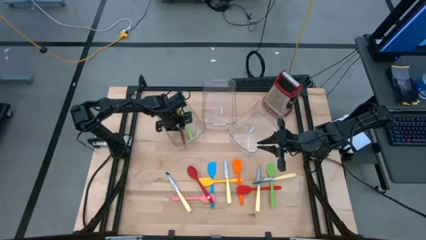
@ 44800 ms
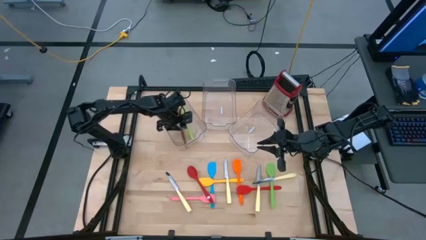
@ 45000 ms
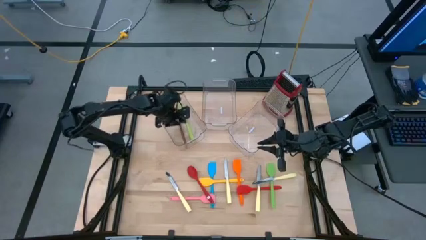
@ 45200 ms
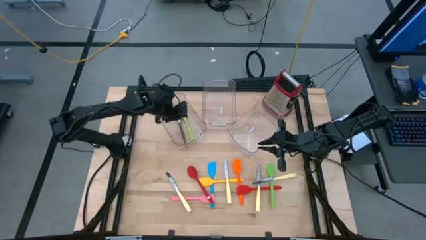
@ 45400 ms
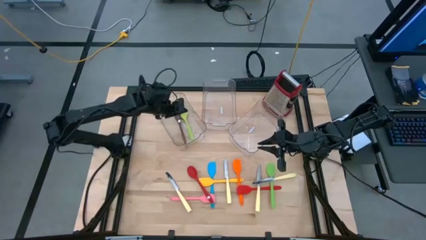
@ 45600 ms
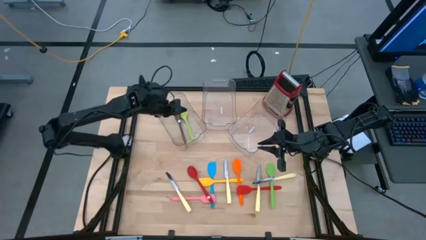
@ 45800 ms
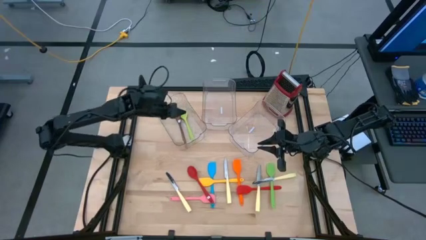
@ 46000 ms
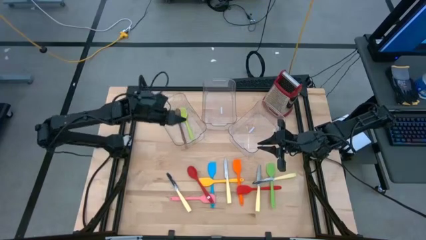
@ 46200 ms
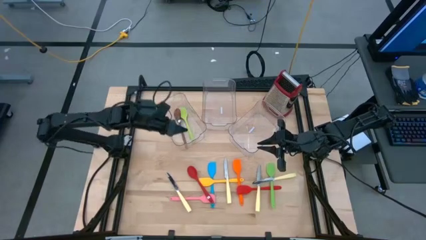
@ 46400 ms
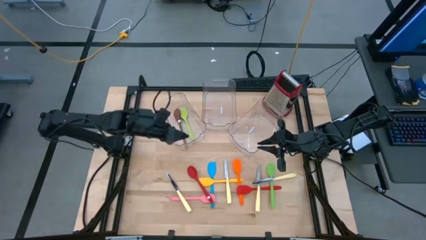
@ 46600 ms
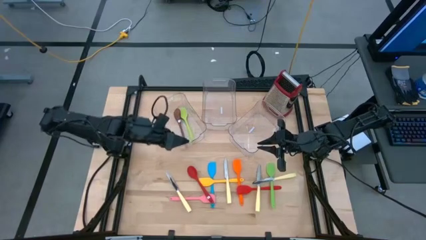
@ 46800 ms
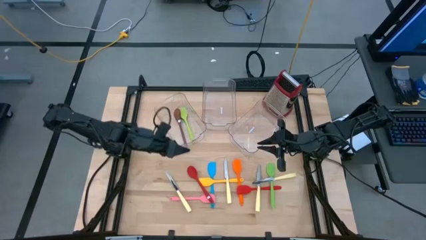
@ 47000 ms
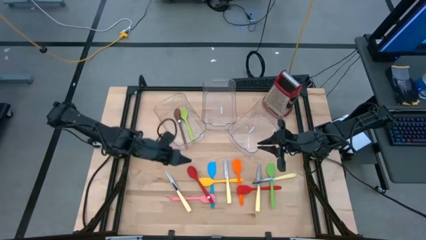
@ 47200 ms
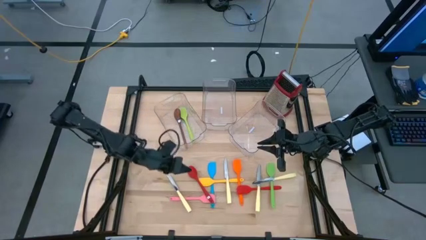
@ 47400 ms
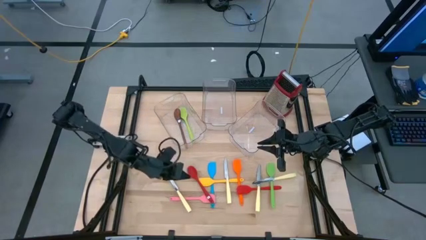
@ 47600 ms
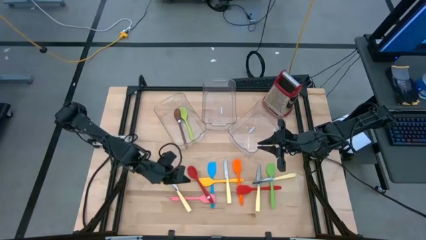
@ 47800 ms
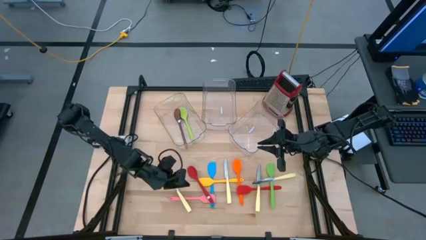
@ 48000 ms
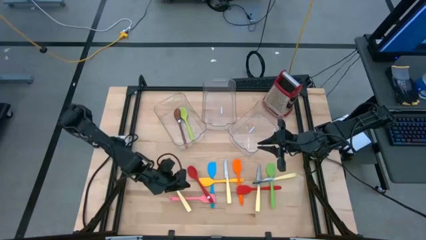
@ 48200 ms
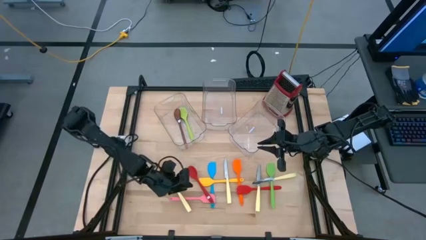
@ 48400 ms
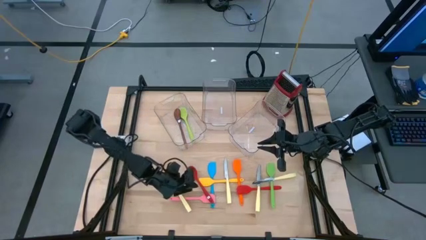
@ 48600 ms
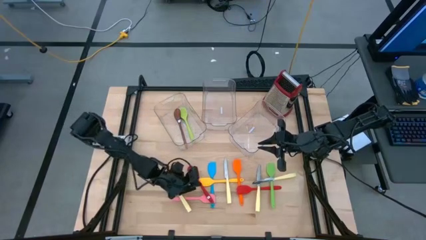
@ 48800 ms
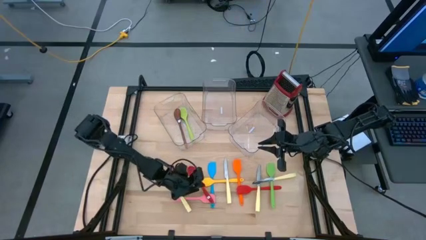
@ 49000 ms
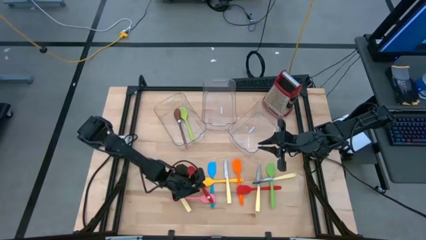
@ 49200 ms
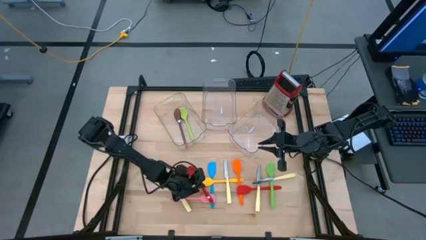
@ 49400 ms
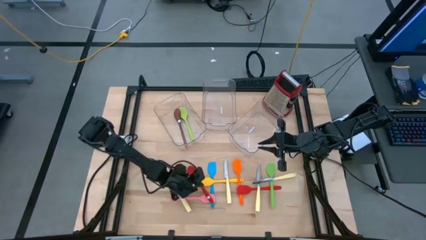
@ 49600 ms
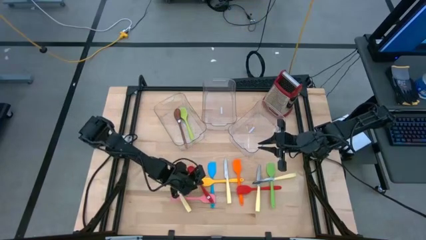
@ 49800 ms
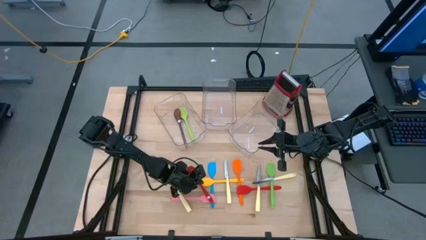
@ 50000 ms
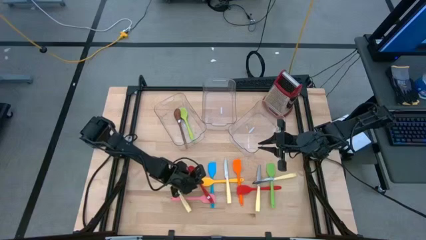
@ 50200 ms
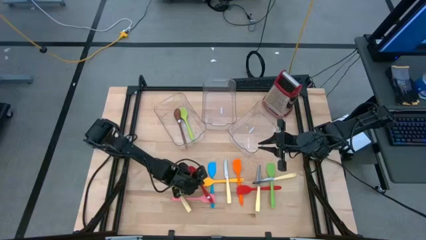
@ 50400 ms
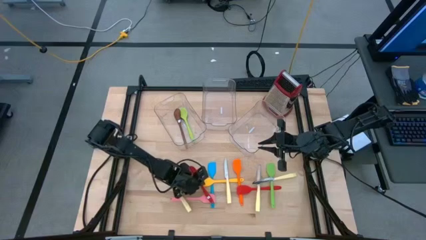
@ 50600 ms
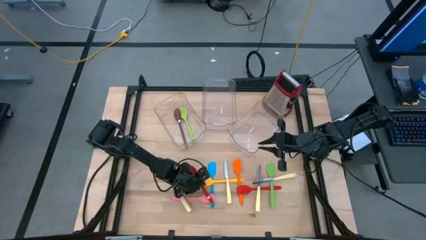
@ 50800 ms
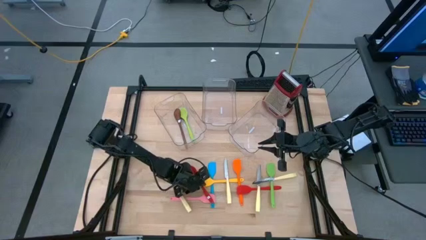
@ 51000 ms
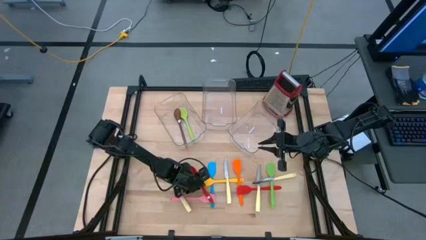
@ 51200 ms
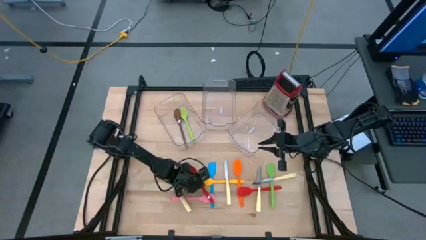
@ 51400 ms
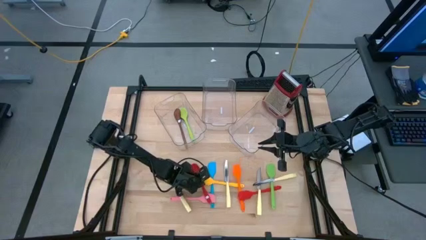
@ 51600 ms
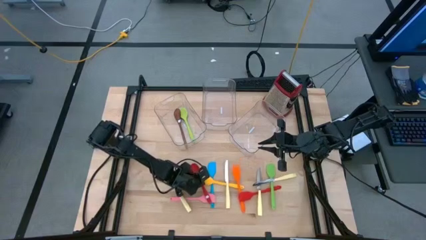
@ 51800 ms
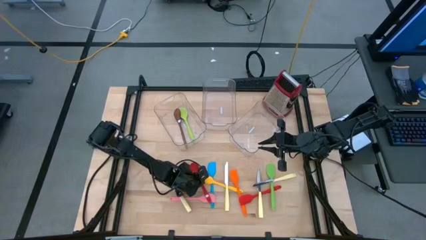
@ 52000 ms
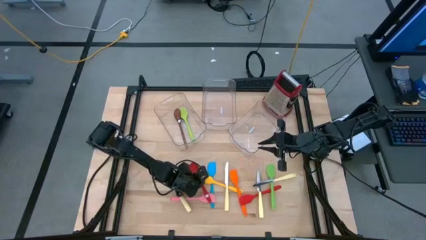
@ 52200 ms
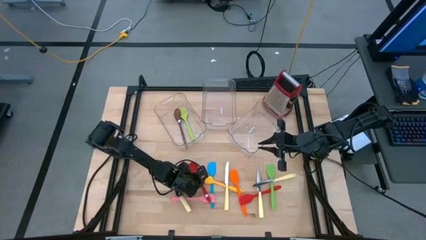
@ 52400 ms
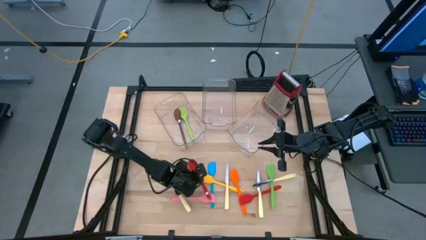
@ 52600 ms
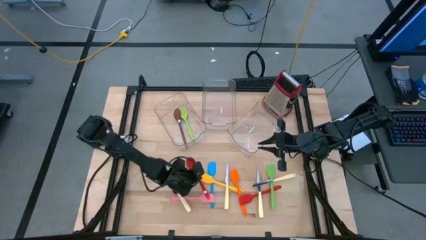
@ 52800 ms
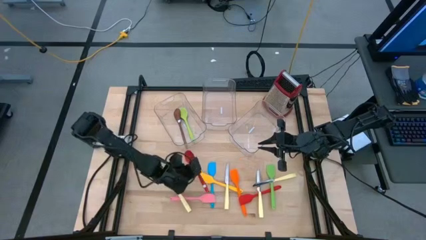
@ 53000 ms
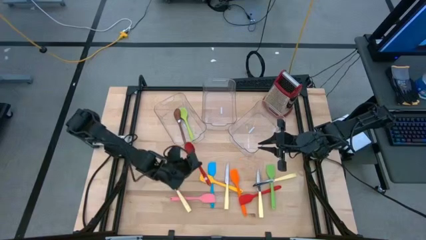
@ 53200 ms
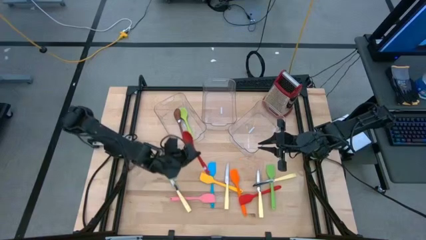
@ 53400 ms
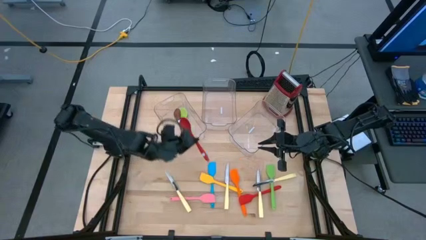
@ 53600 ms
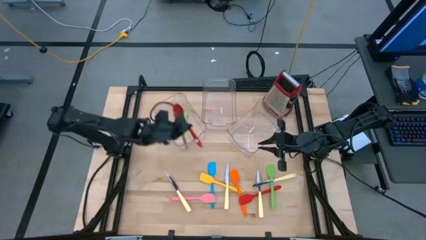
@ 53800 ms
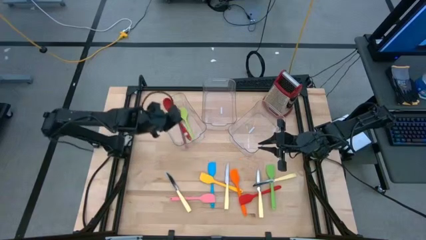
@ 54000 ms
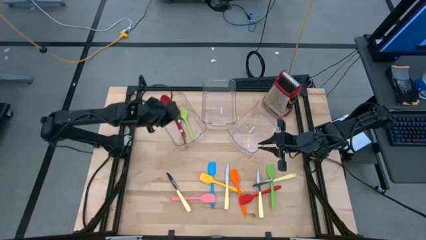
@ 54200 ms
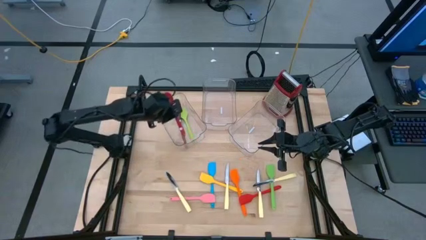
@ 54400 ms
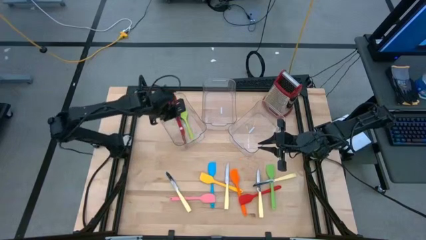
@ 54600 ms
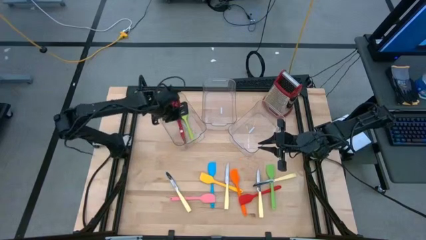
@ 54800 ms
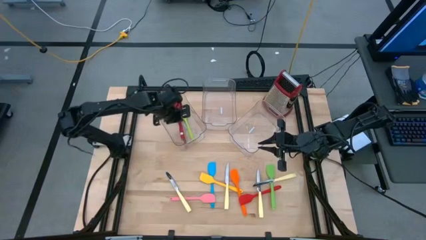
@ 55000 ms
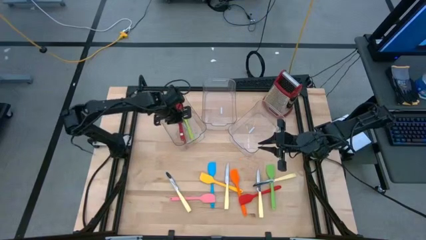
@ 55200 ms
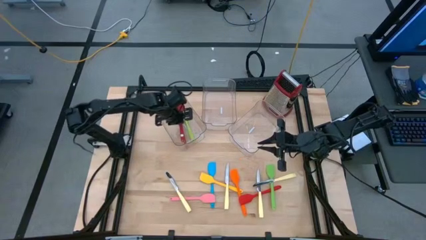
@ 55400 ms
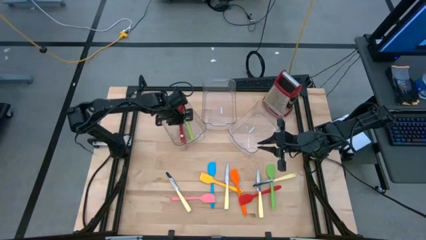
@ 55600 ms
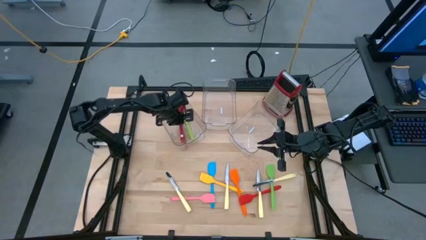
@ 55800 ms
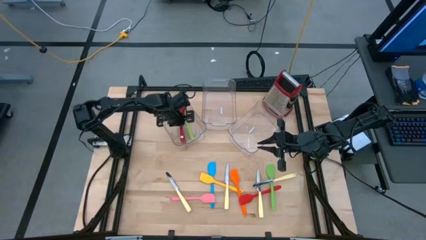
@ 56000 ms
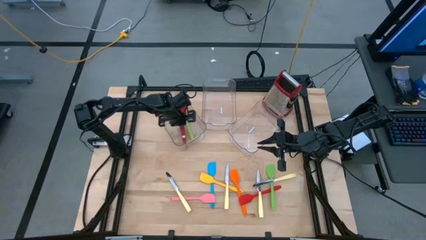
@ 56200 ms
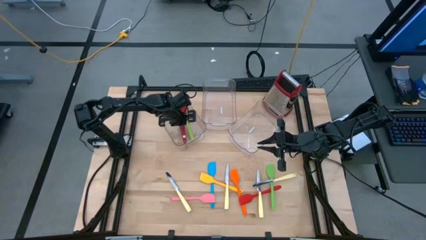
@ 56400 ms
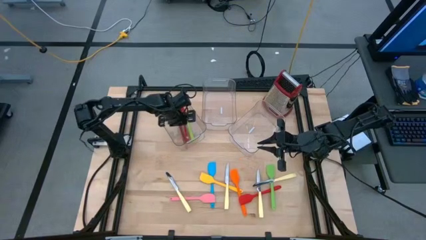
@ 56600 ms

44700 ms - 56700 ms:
Task: Pick & Place Kitchen Items
Put the red serving spoon into the left transparent bin

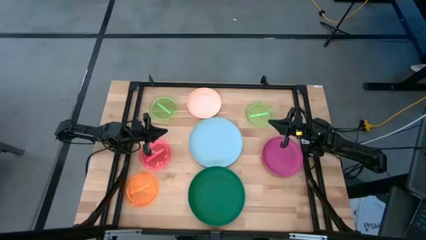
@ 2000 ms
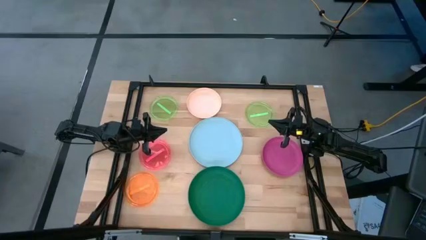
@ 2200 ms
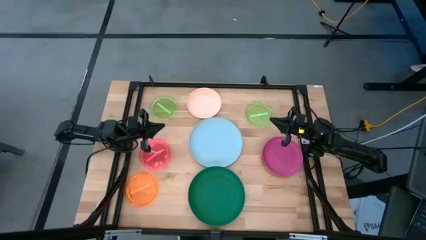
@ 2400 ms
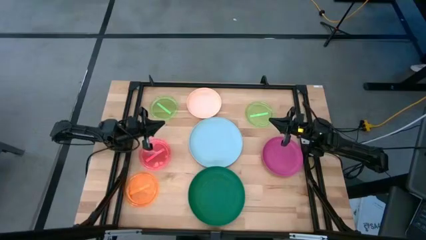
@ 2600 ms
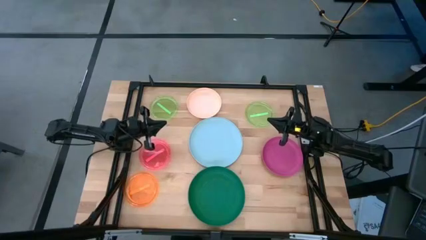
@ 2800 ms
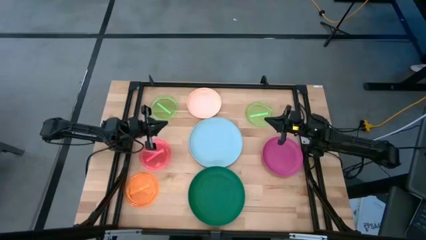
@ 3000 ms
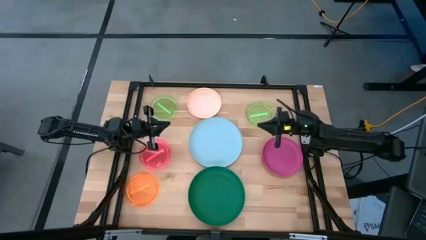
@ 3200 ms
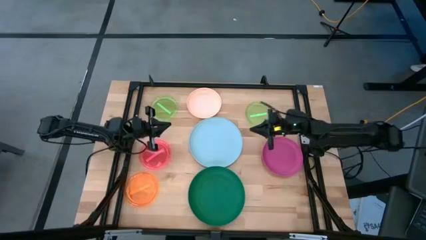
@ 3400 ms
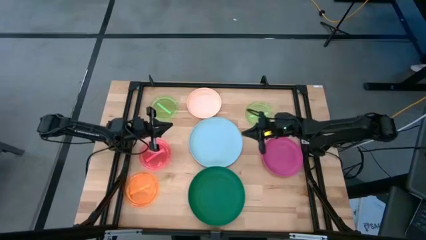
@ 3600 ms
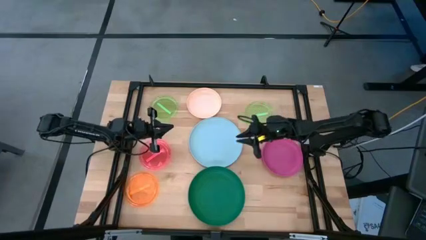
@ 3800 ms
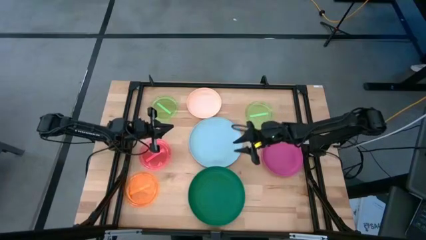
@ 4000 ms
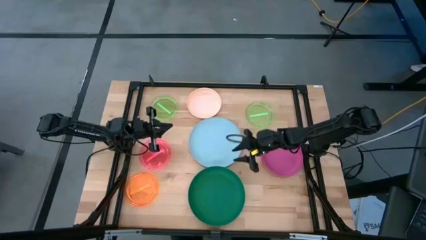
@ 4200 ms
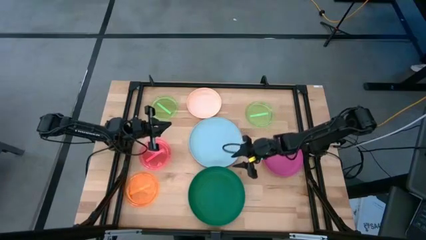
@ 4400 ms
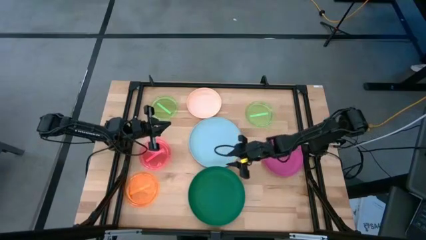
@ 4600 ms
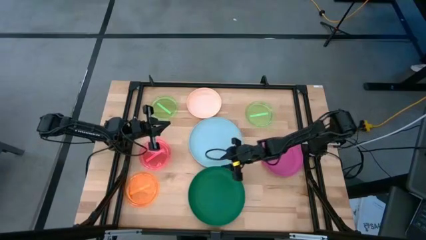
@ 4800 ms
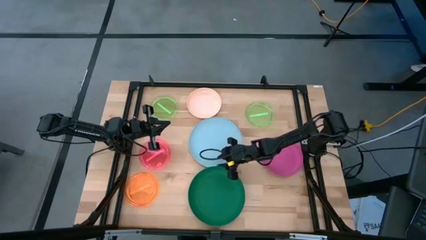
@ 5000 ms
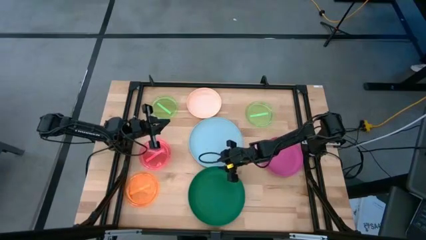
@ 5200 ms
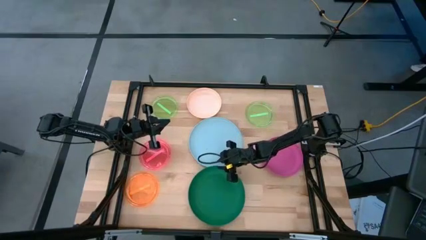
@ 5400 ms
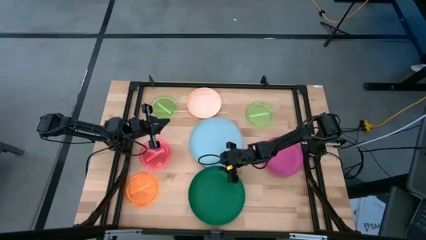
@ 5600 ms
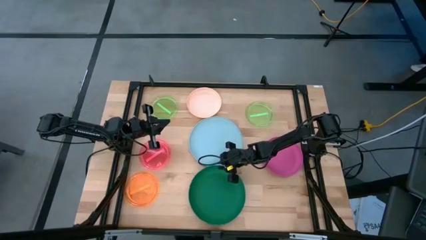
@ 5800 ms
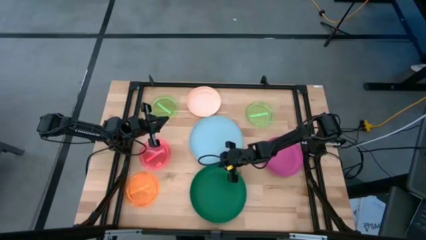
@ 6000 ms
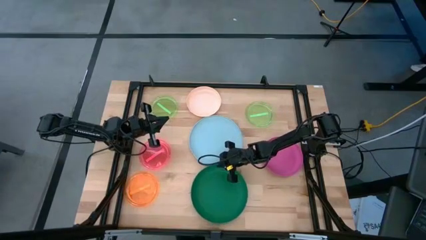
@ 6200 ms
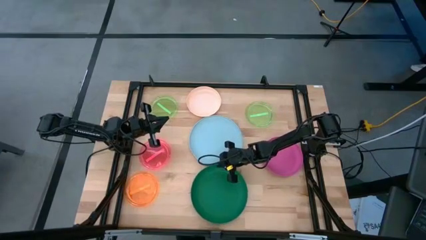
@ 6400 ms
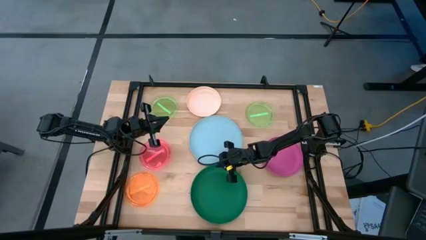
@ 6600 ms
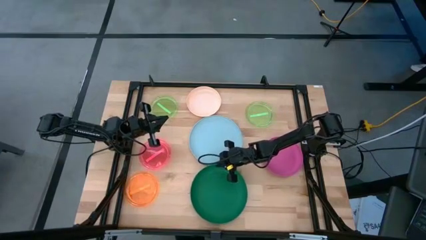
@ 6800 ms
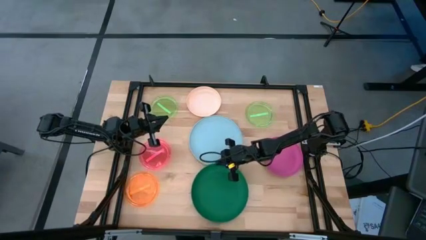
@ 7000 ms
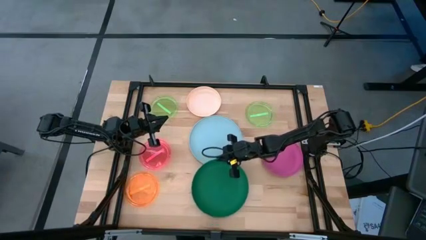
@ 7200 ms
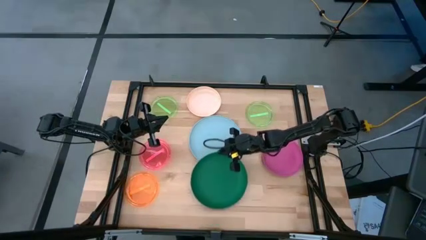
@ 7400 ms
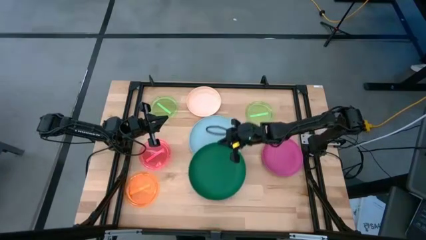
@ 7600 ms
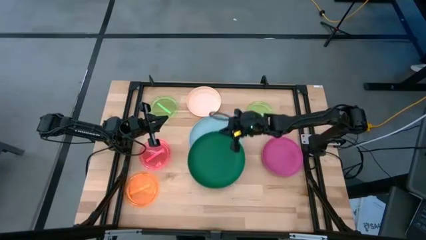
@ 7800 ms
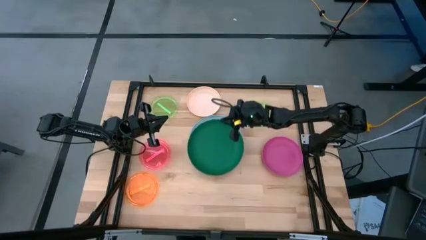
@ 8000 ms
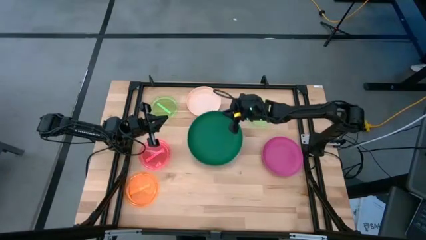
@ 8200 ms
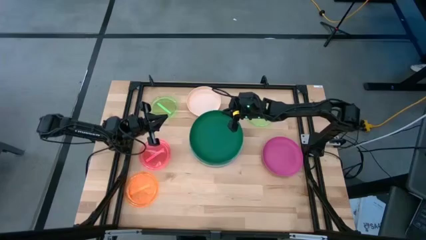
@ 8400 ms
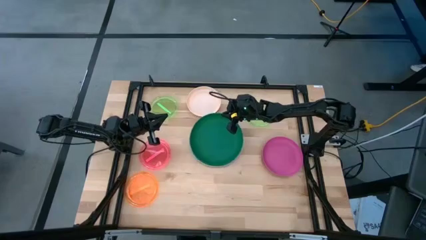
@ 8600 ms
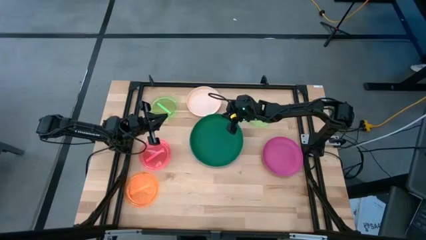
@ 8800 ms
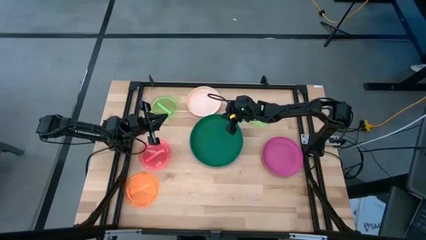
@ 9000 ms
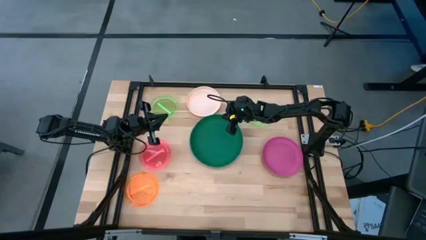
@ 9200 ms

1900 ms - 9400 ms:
Task: Stack plastic plates
Stack the dark green plate on the blue plate
